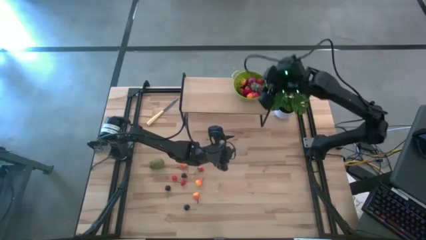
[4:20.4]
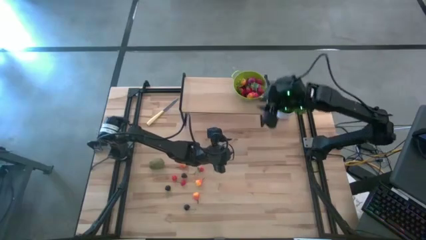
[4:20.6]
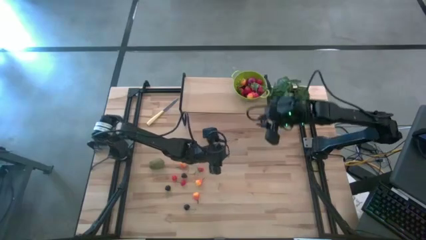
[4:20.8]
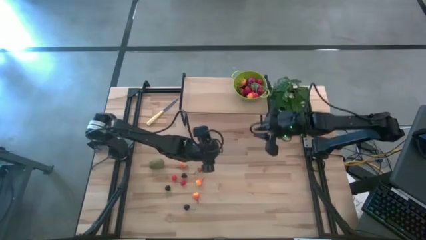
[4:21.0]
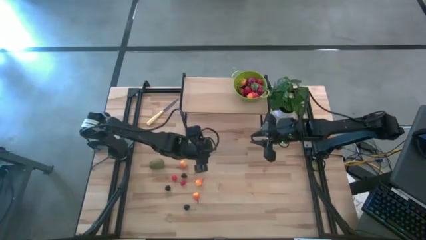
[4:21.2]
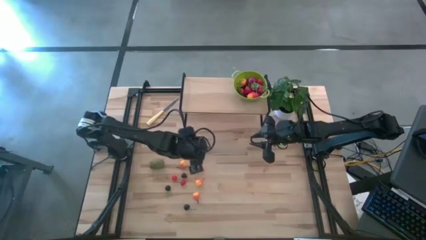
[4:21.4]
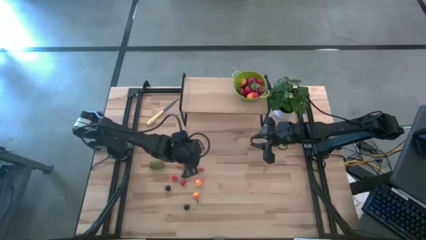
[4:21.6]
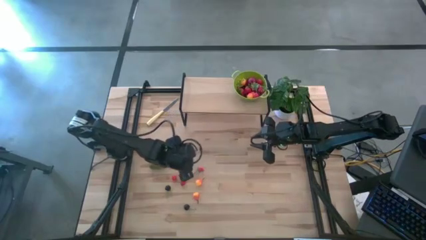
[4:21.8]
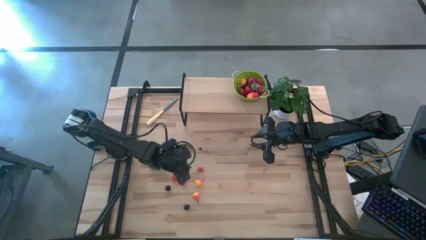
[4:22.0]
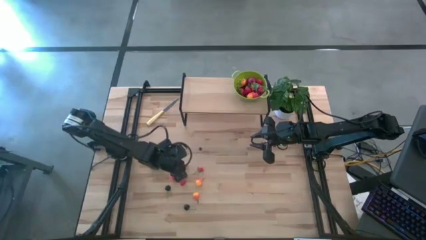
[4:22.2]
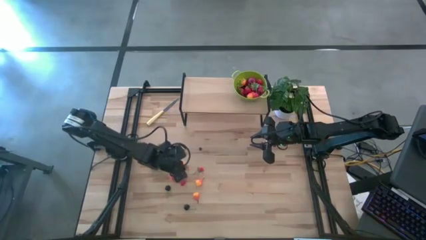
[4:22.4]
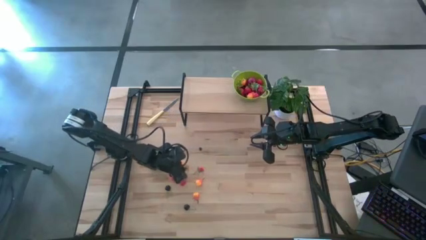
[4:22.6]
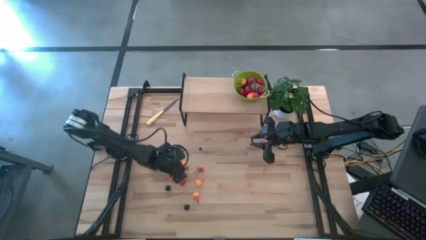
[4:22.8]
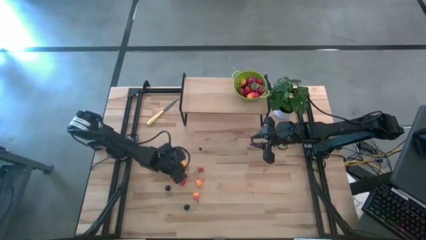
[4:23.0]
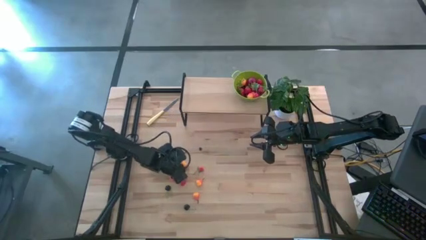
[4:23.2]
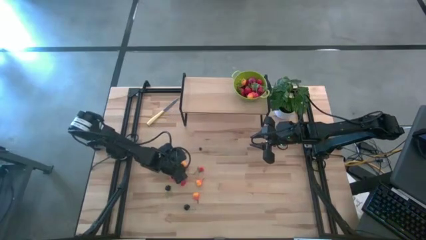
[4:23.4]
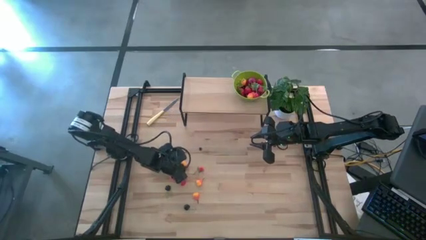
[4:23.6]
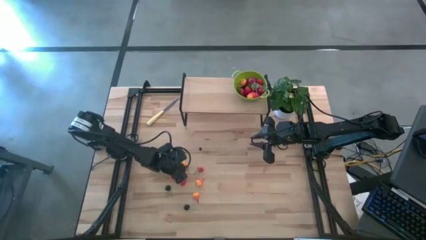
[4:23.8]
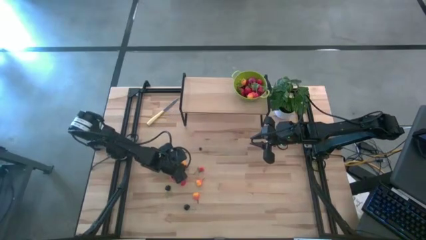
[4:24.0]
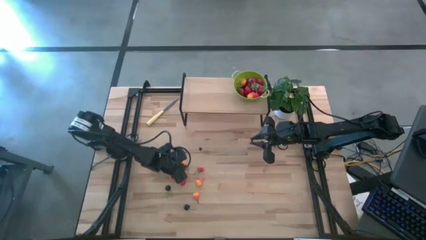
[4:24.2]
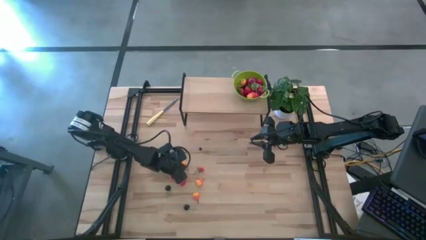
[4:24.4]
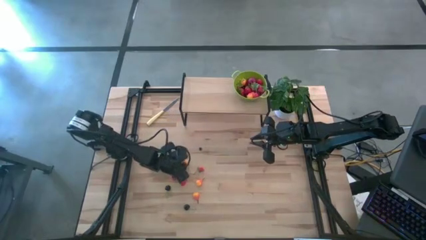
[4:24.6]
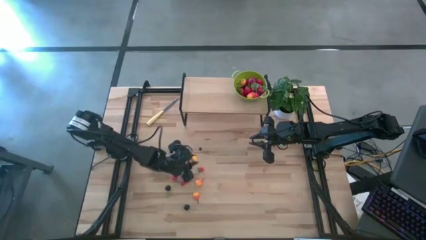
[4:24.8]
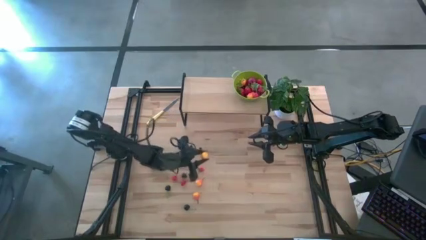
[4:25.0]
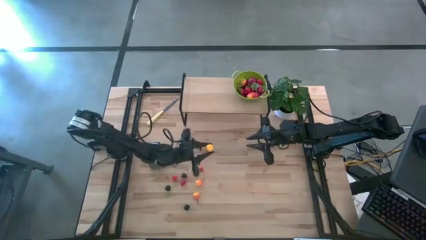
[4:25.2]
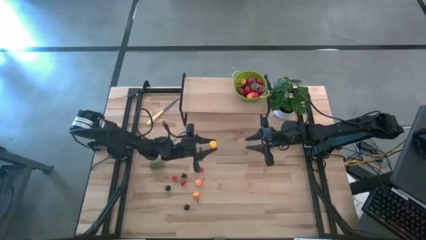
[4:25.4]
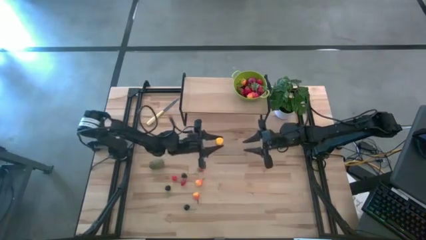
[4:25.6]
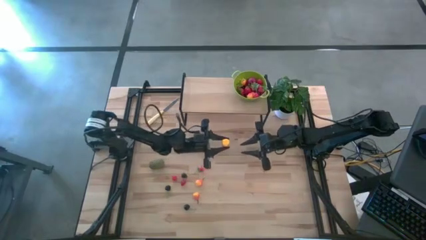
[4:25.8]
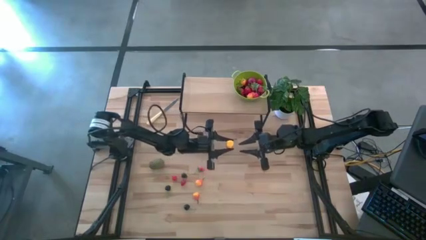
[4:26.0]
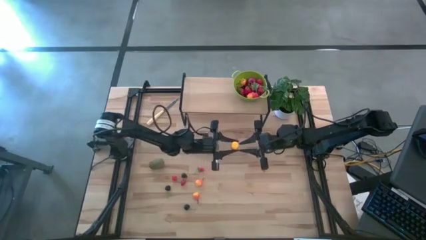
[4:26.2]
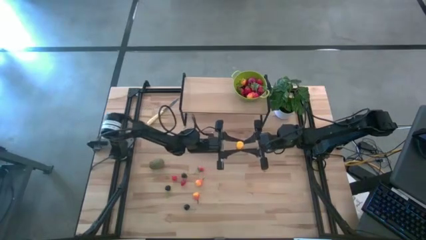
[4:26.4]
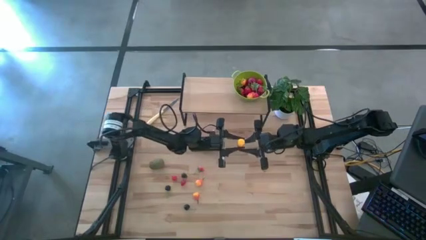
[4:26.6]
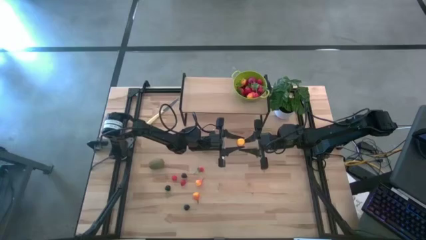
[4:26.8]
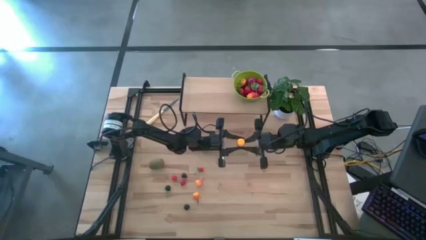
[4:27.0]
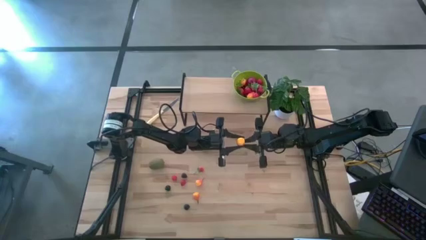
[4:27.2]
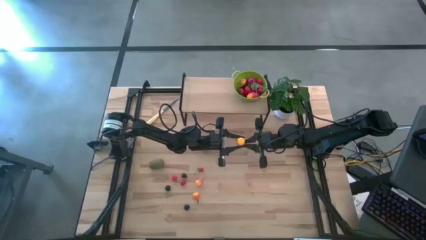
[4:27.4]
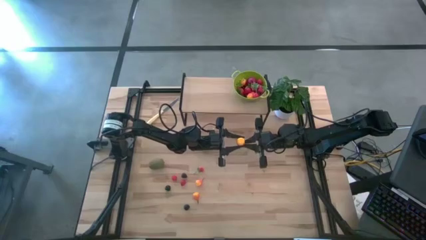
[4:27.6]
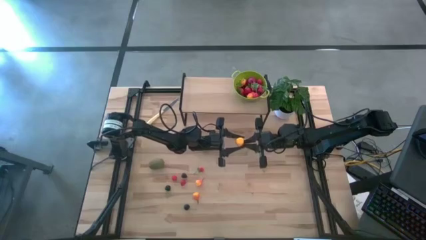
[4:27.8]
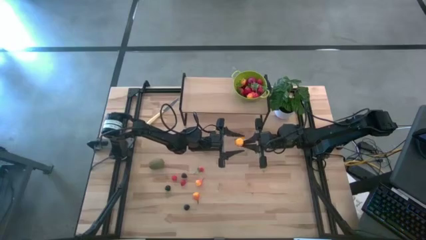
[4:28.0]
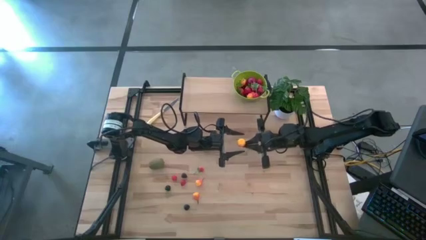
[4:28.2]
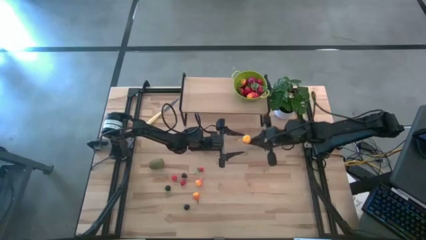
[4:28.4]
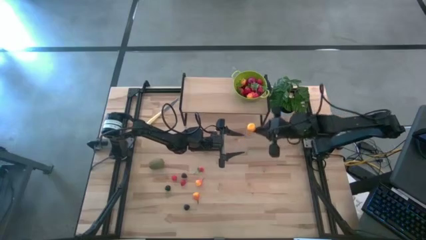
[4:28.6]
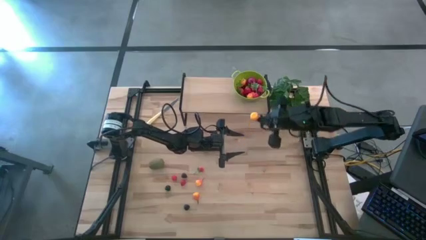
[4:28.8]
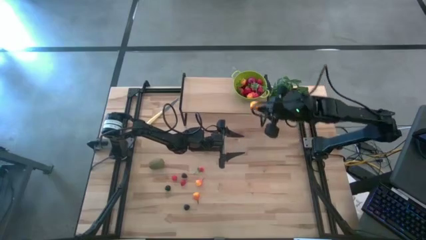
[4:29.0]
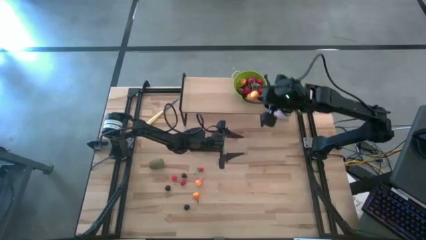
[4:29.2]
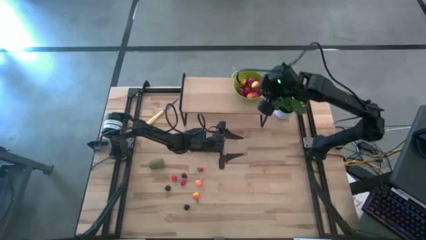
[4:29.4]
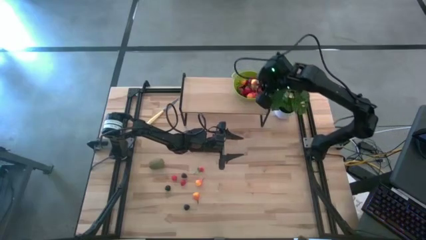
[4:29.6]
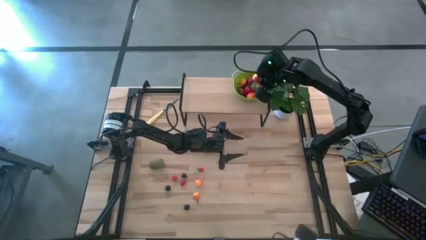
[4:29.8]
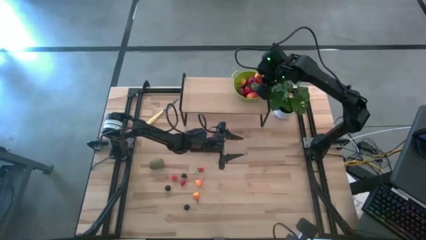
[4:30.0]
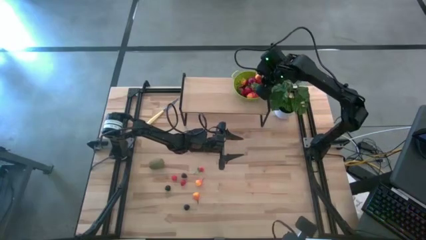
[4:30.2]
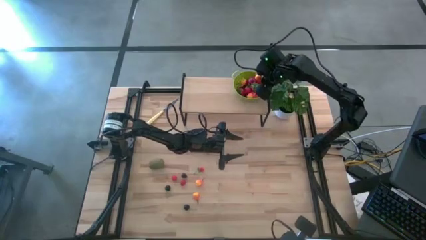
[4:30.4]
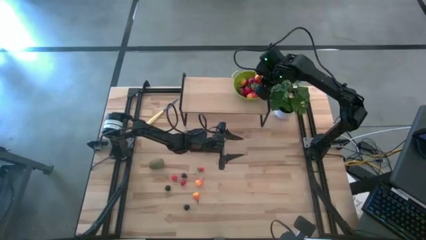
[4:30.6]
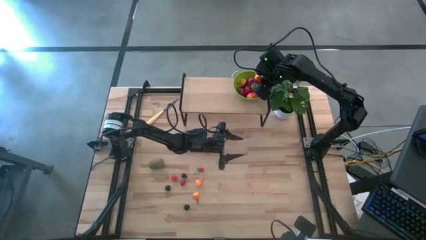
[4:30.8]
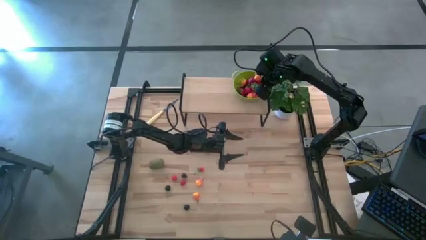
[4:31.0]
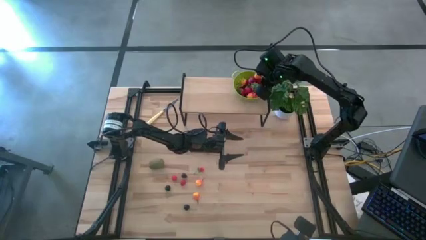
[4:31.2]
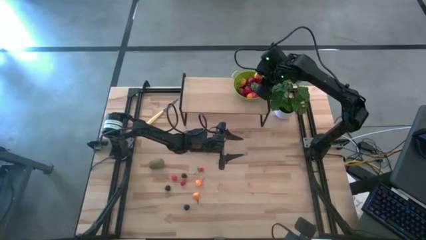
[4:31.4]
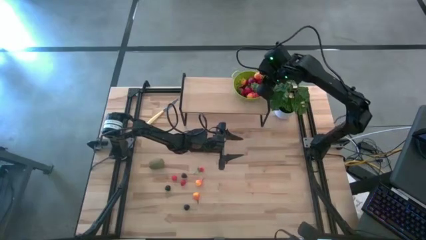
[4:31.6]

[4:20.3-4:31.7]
Task: Build produce basket
Put the pear into the green basket

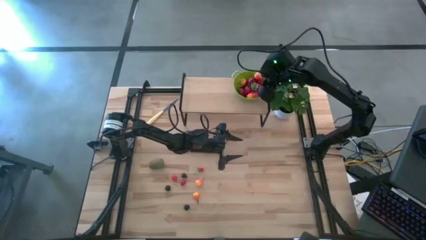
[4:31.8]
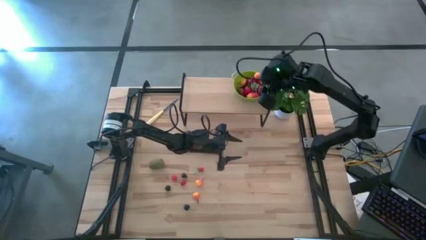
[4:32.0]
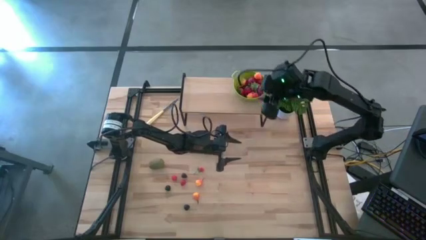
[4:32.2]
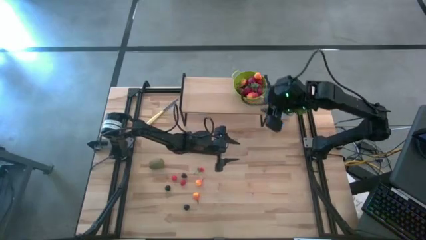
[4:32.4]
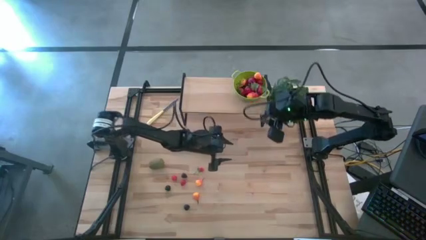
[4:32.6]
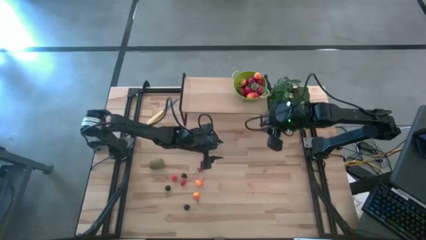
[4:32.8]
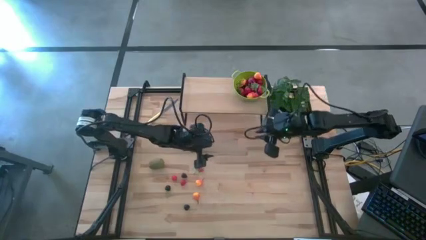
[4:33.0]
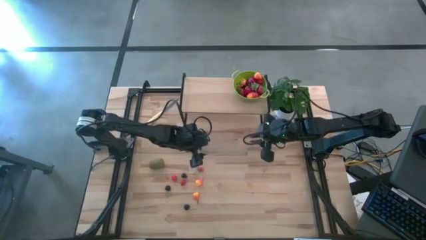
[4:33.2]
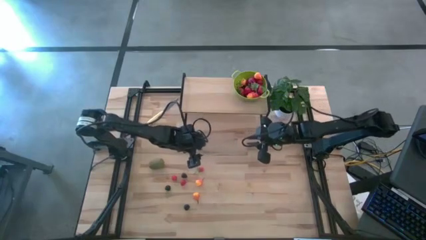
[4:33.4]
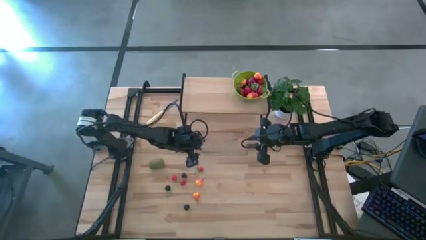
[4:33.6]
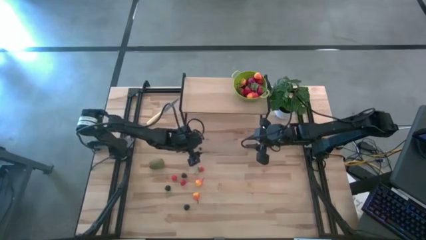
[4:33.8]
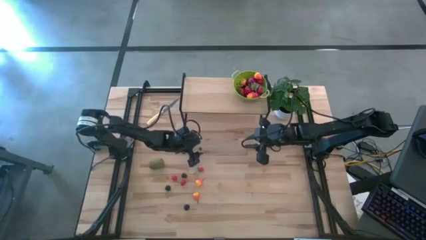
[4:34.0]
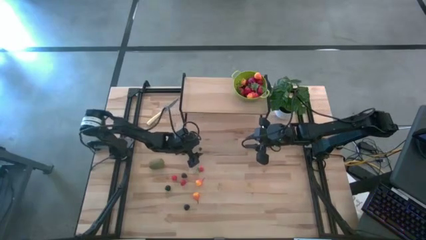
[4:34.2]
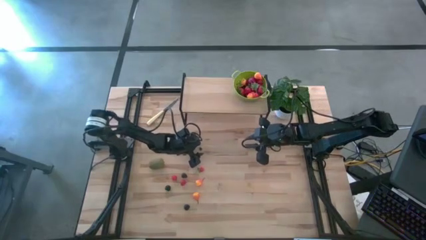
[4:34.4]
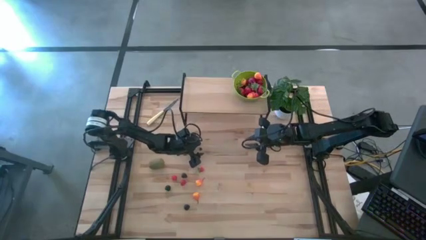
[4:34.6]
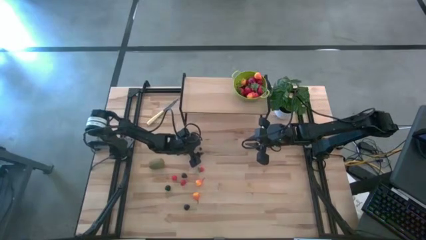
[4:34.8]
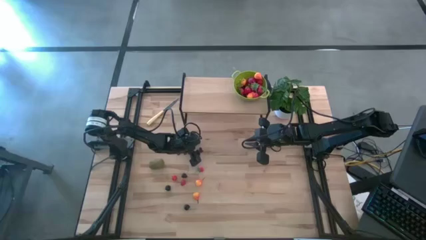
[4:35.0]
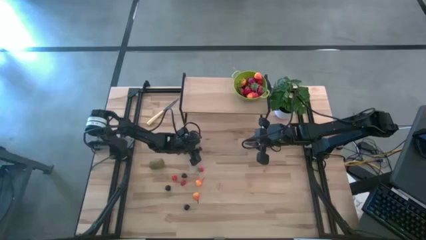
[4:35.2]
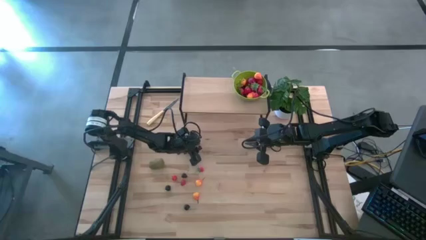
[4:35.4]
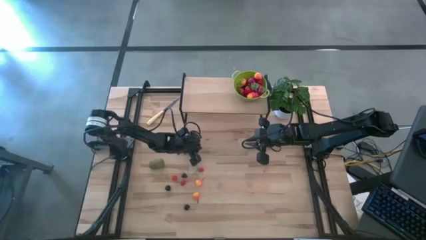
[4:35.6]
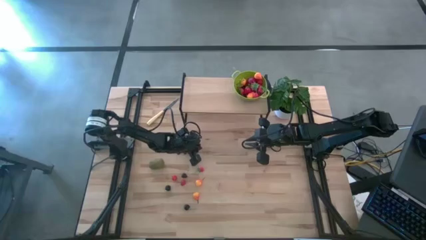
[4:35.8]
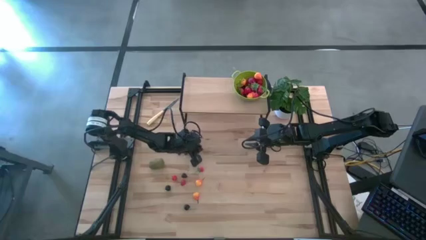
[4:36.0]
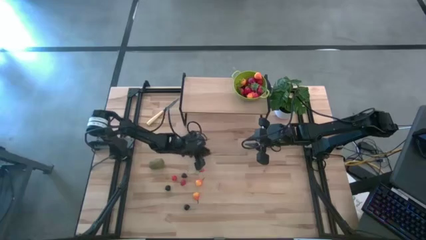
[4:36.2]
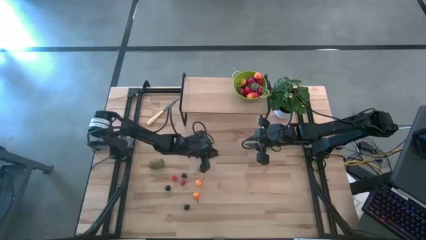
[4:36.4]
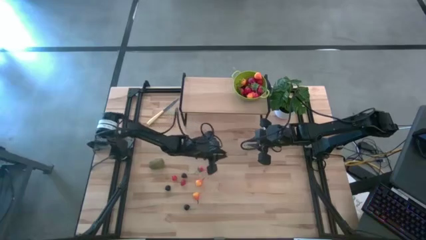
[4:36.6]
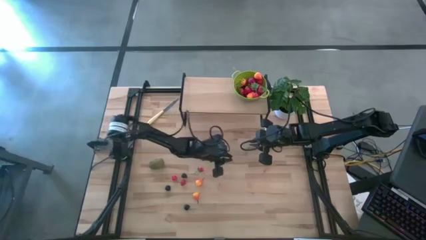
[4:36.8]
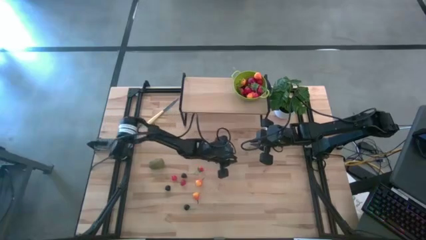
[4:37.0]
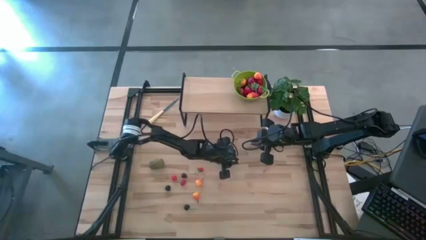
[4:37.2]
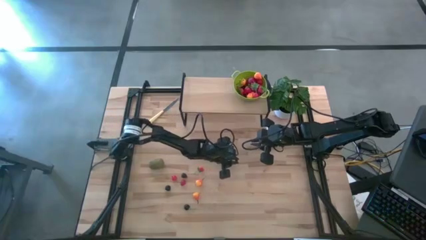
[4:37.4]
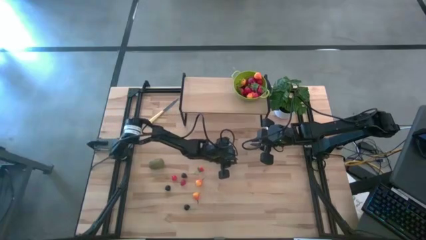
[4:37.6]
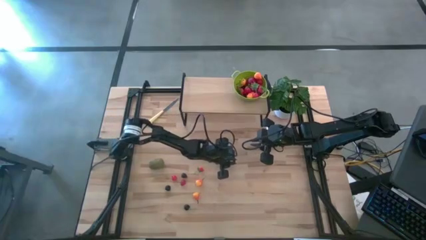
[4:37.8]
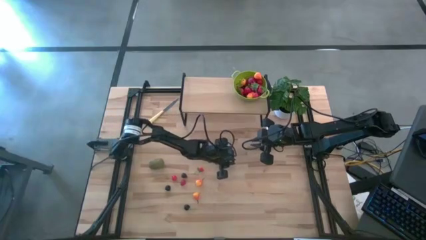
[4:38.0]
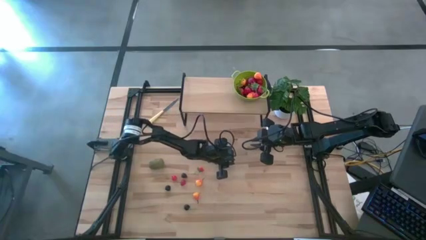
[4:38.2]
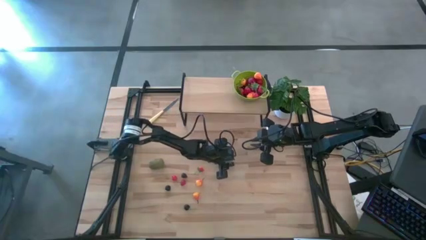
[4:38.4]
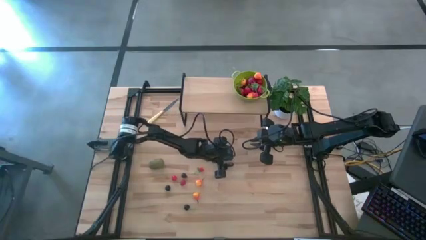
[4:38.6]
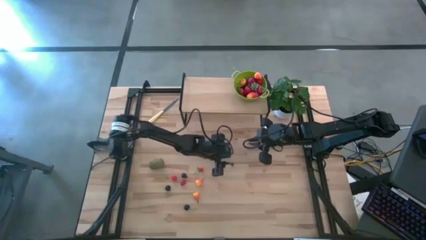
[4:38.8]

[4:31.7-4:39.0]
Move the blueberry to the center of the table
